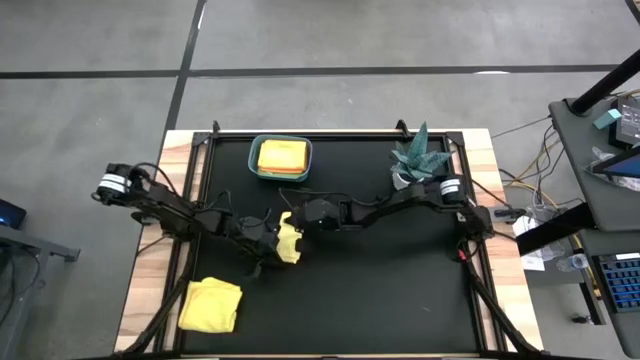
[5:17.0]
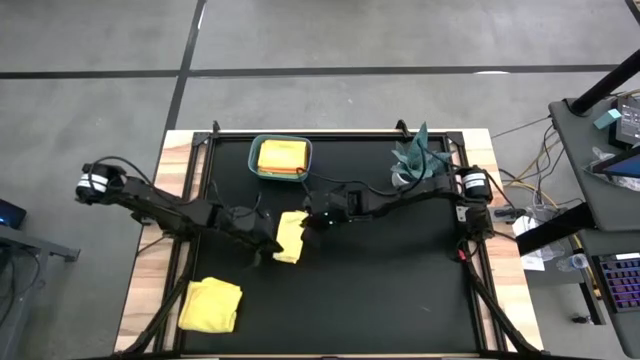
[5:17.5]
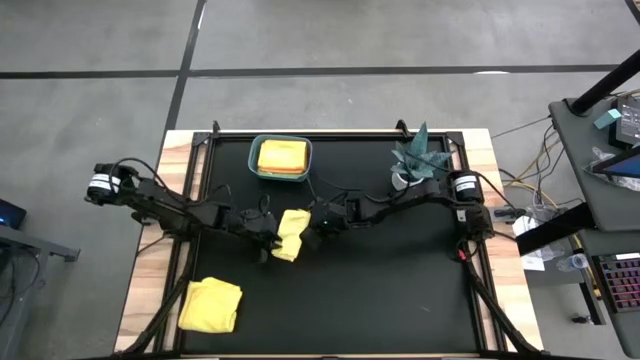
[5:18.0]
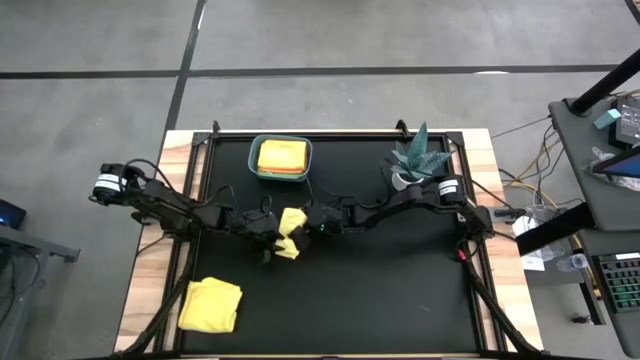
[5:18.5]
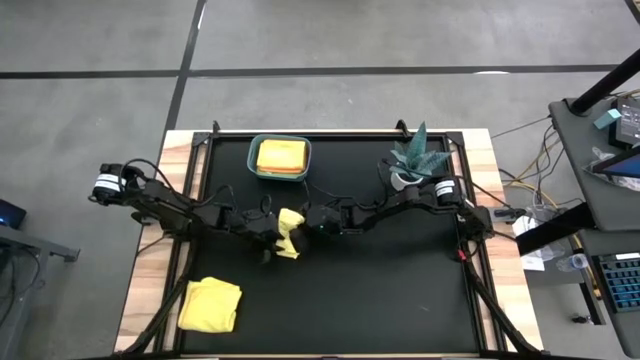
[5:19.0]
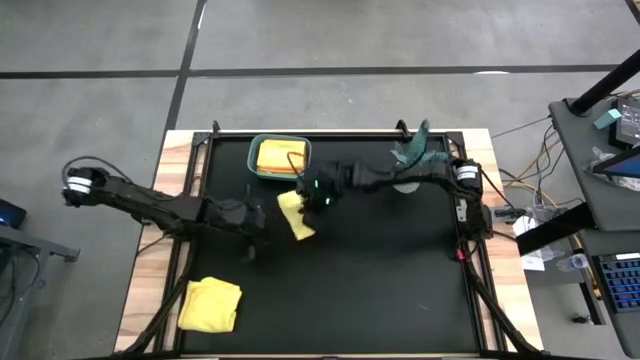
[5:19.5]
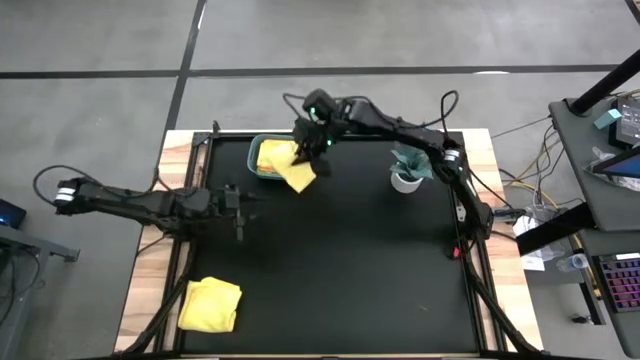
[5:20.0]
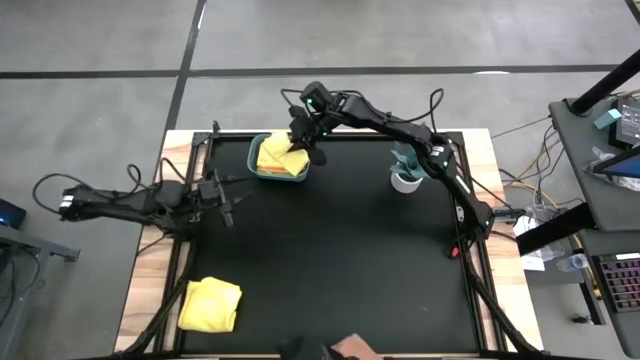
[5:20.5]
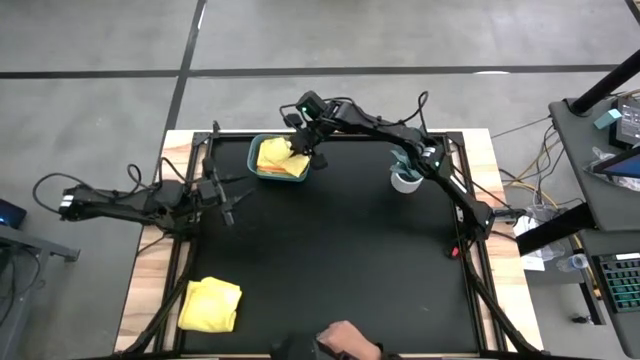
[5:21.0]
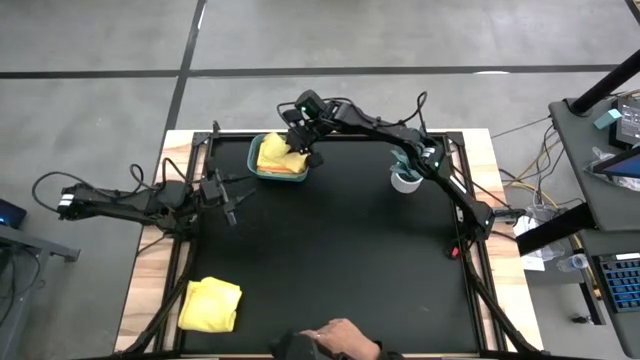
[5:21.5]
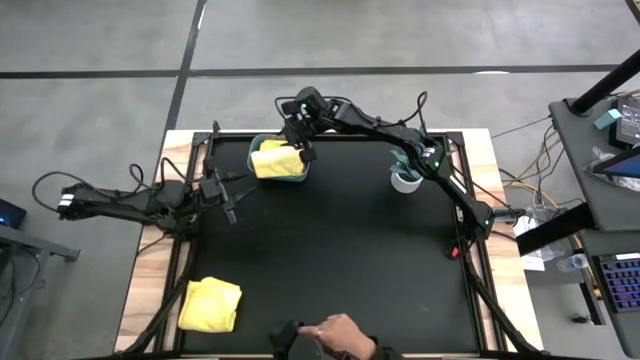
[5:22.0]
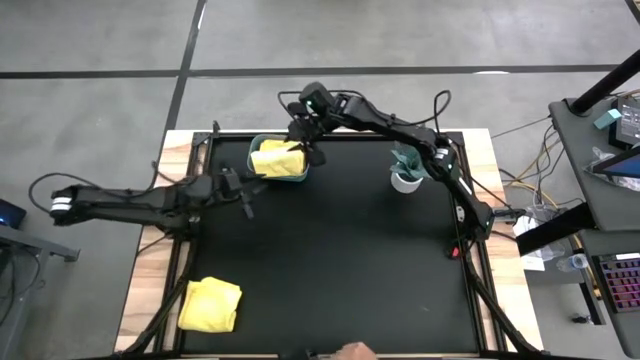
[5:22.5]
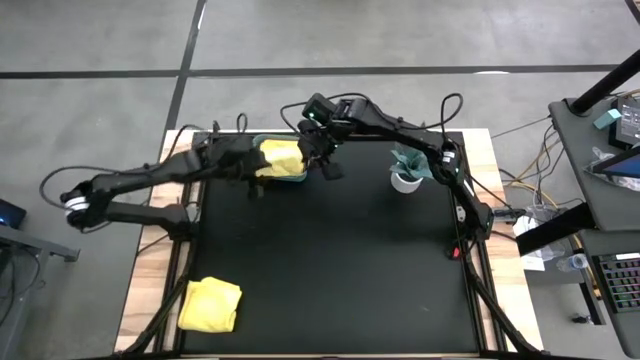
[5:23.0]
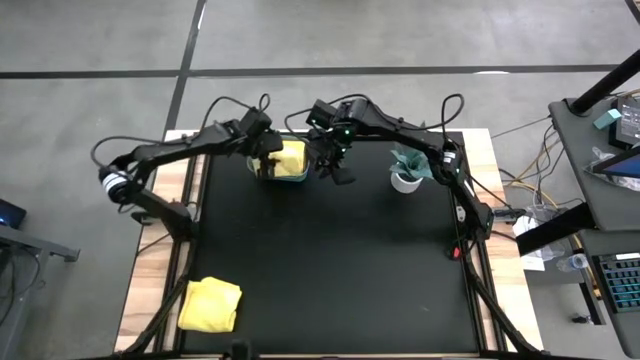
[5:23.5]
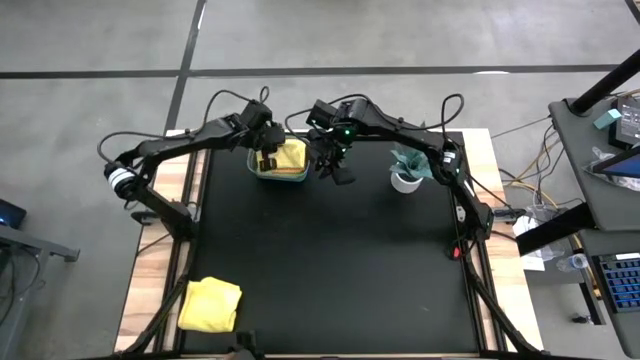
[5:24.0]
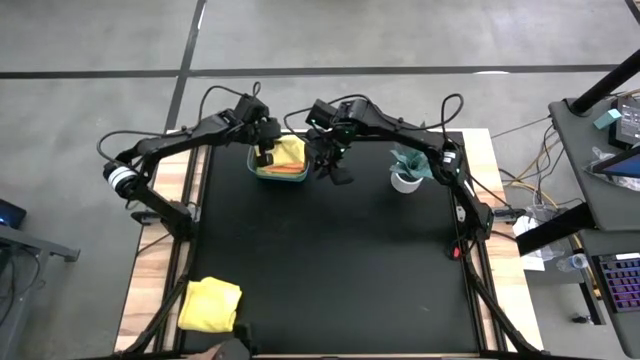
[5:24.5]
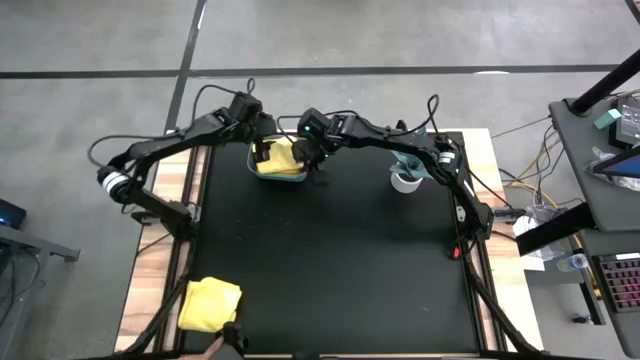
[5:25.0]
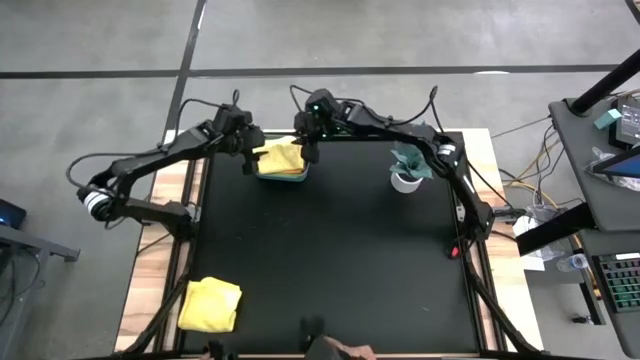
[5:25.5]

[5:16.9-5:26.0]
Task: Fold microfiber towels
Put the right yellow microfiber cloth into the blue bin

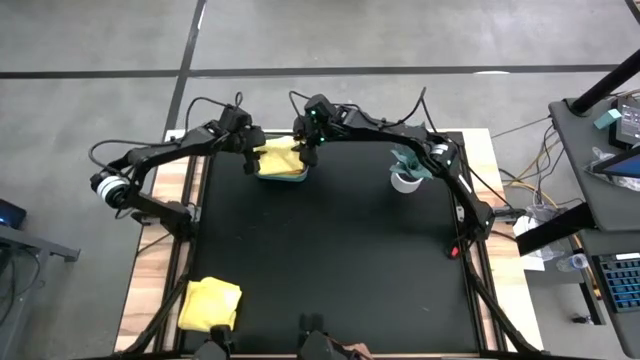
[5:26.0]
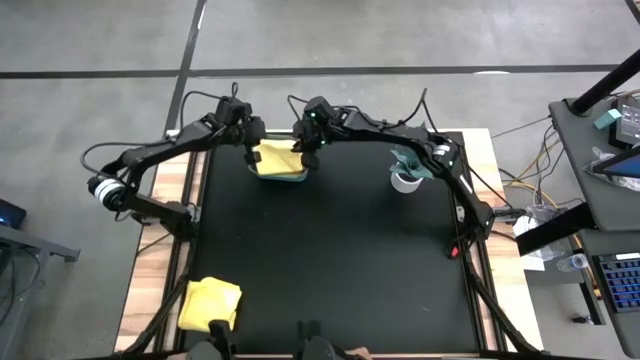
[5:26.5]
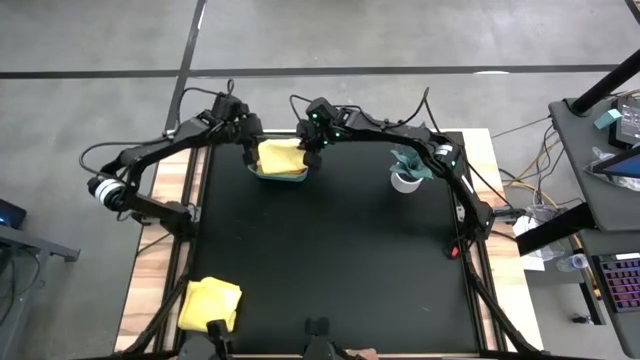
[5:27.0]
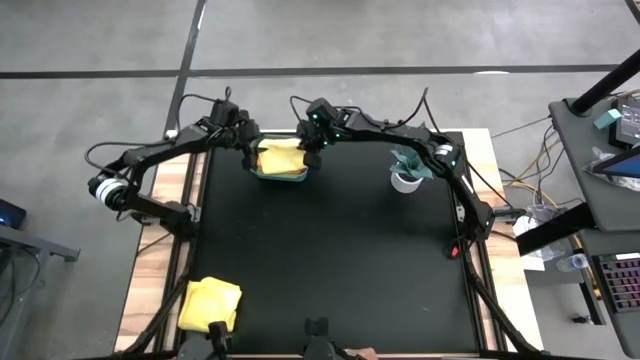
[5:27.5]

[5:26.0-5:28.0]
Put the right yellow microfiber cloth into the blue bin

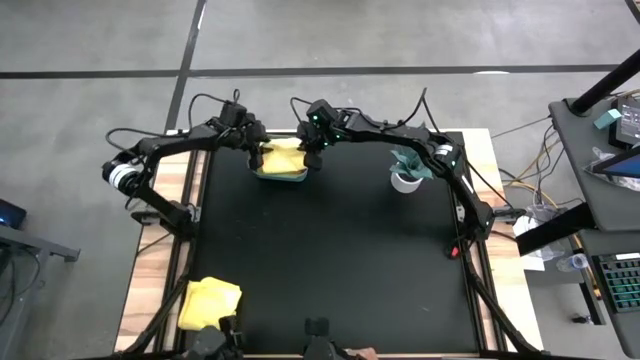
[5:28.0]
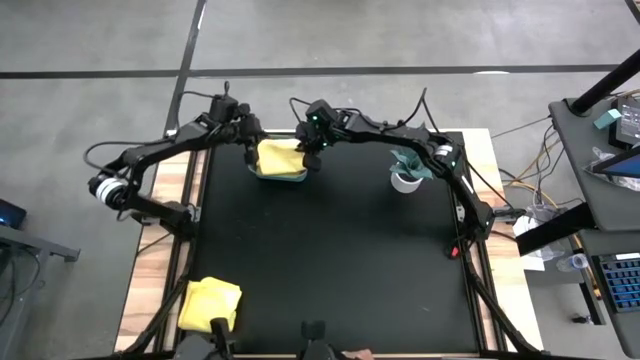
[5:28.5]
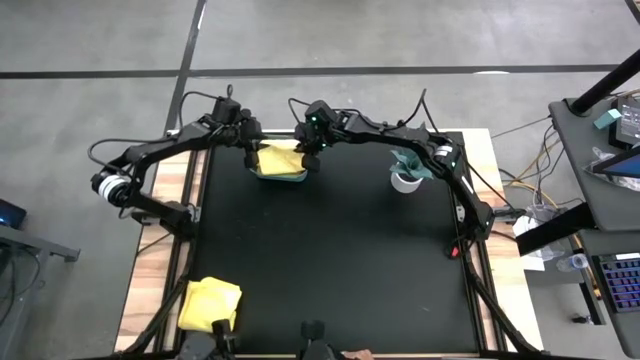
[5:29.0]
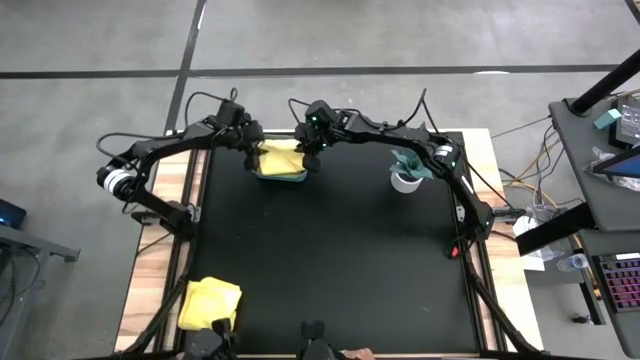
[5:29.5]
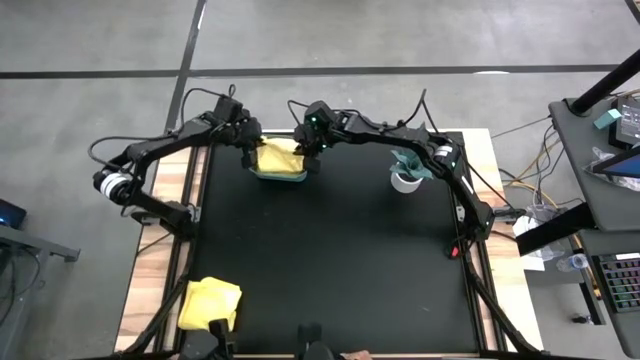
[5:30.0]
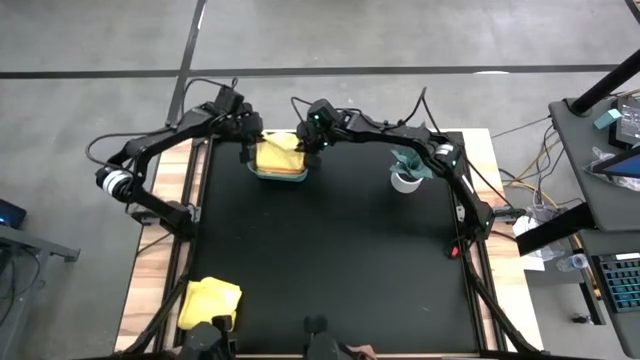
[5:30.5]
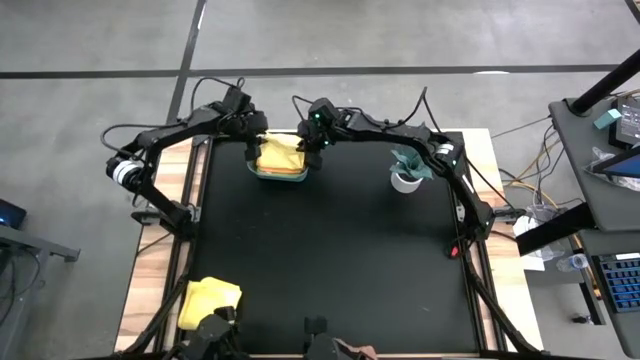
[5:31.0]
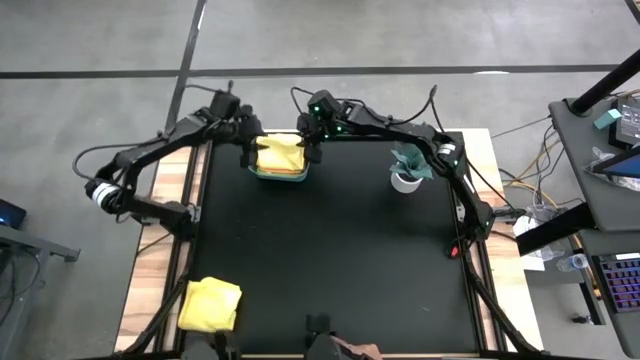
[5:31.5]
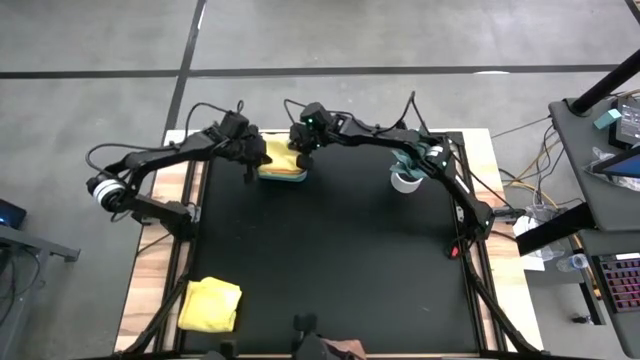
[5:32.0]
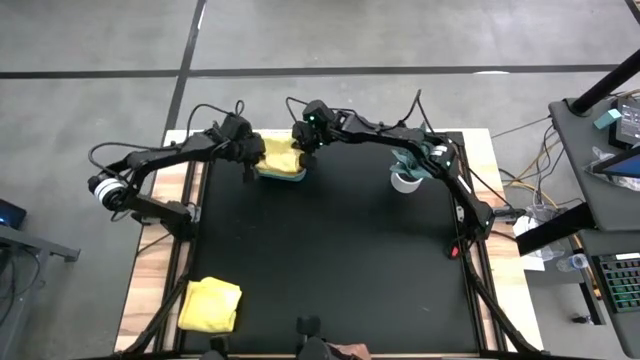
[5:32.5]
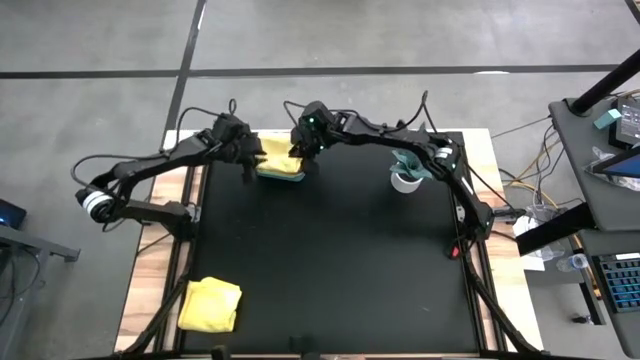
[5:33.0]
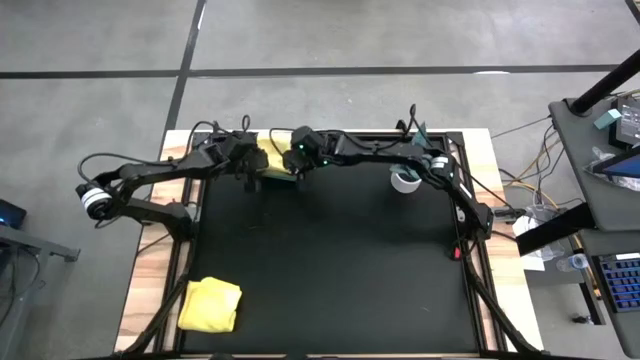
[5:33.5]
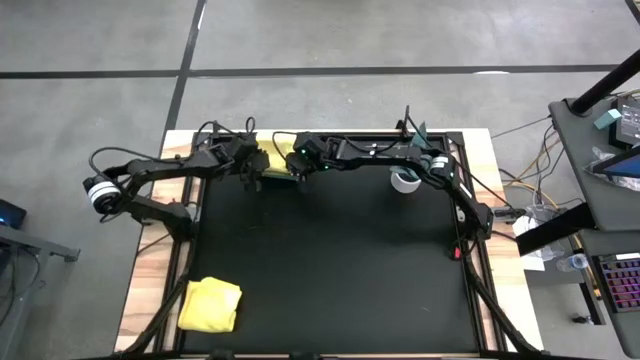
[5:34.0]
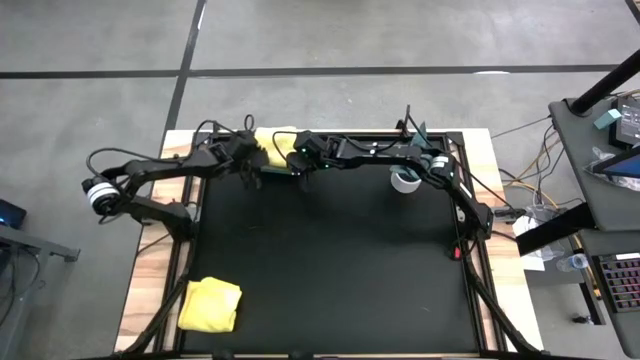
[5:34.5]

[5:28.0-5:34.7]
Put the right yellow microfiber cloth into the blue bin

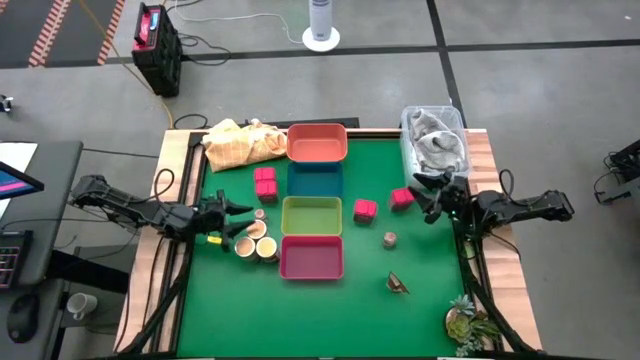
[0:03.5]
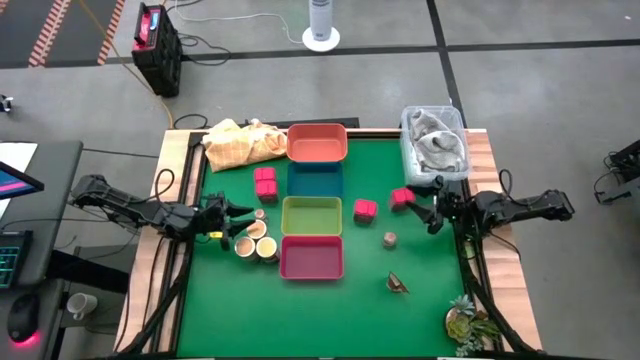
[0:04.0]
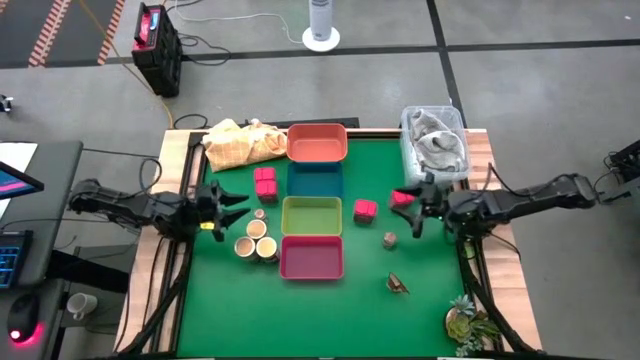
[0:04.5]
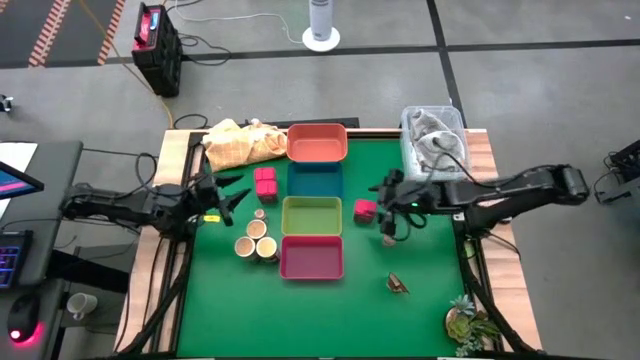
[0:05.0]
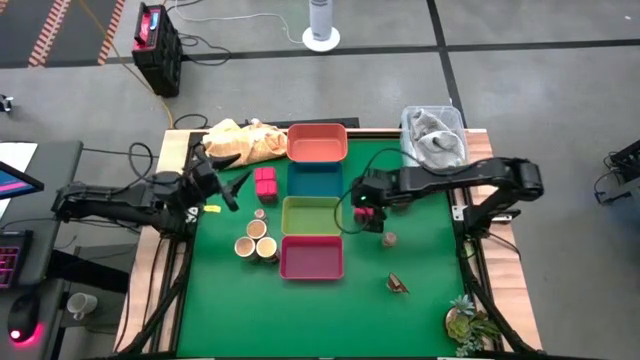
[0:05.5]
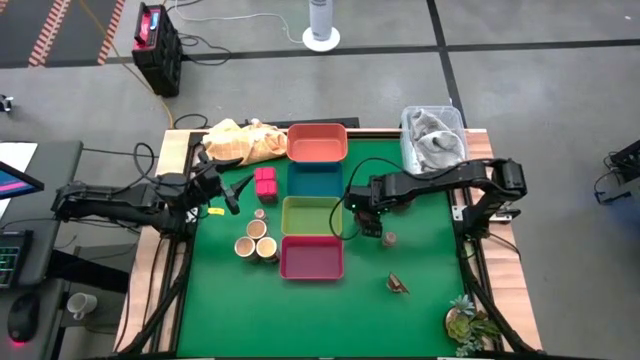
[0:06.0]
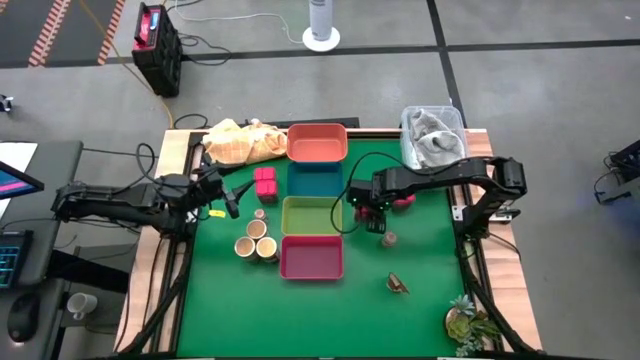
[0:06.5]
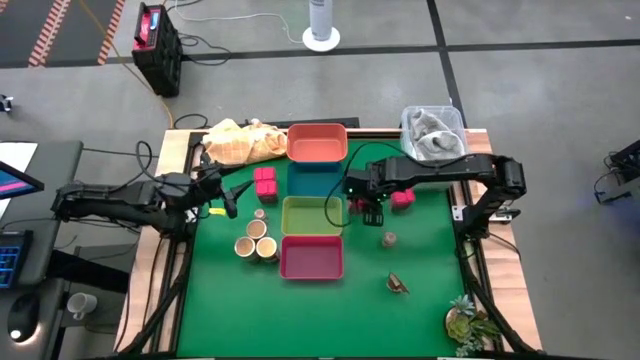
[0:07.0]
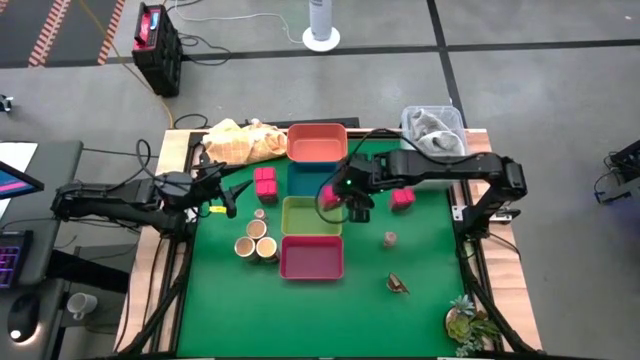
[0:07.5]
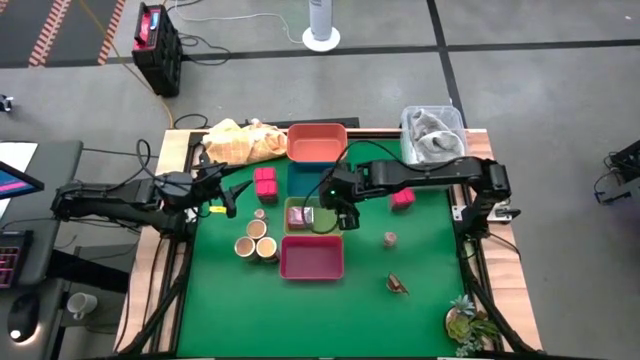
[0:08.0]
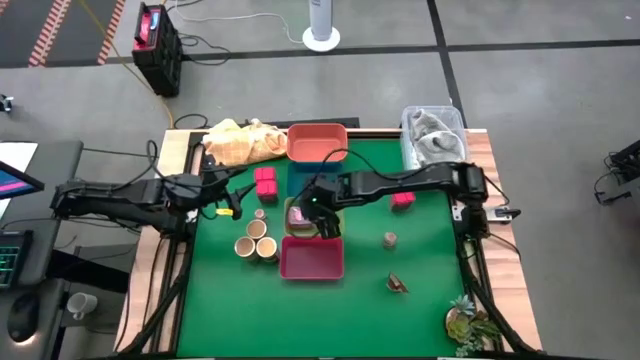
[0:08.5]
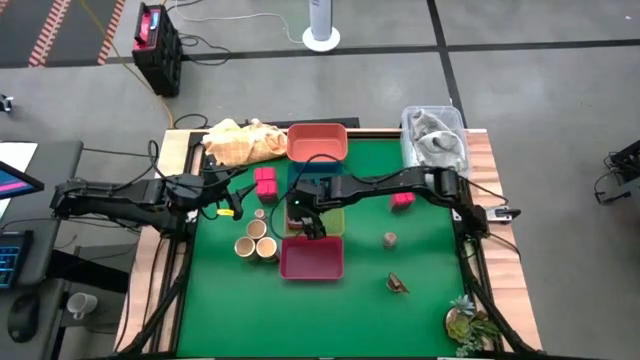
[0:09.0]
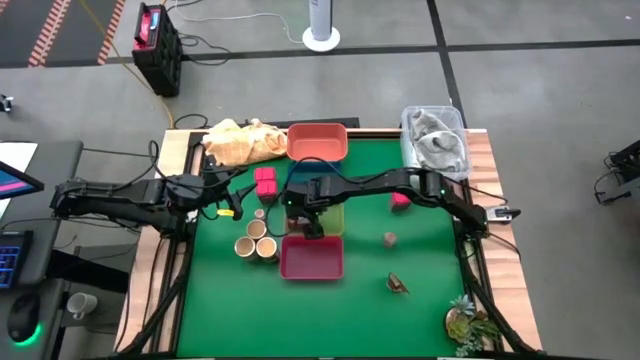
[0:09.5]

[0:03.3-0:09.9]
Task: Sort spices by type
Put the bottom right red seasoning bottle into the green bin
